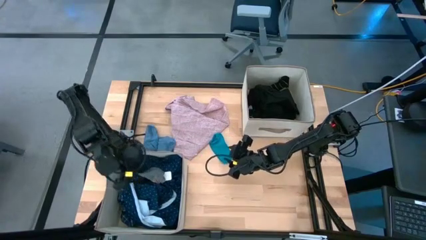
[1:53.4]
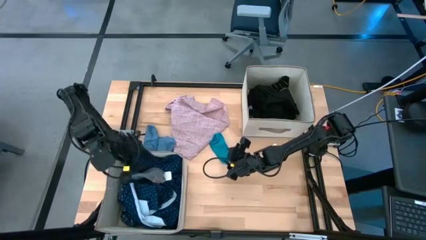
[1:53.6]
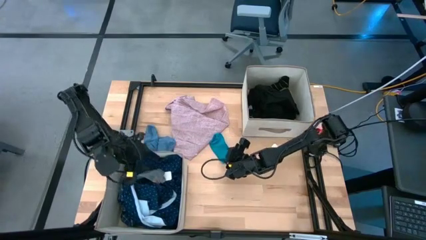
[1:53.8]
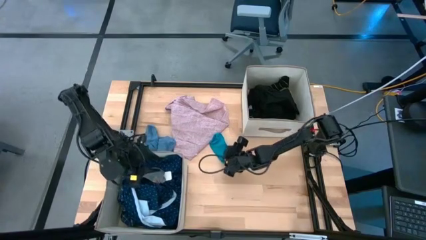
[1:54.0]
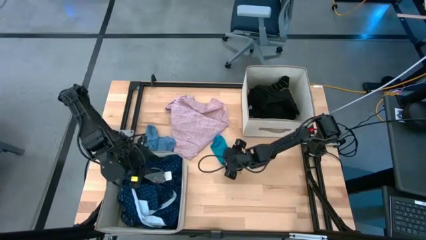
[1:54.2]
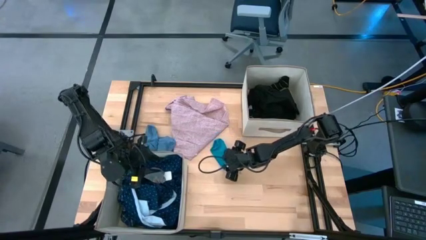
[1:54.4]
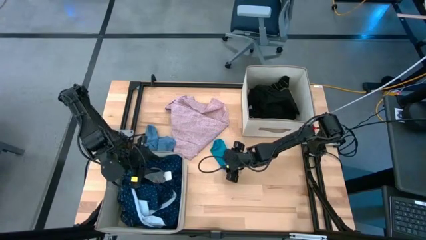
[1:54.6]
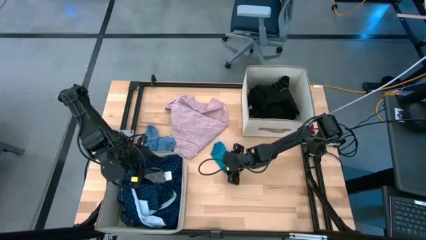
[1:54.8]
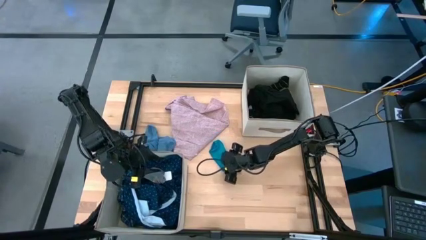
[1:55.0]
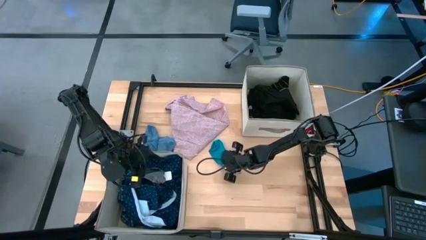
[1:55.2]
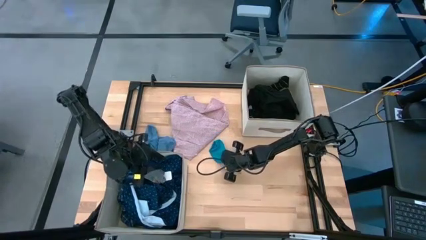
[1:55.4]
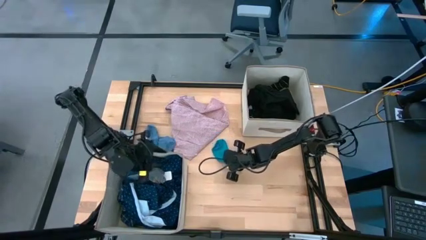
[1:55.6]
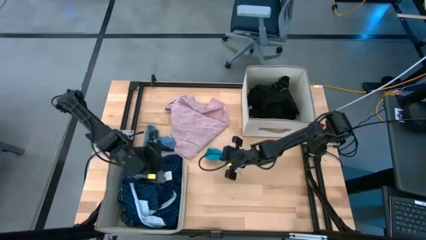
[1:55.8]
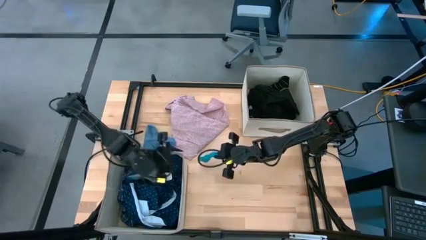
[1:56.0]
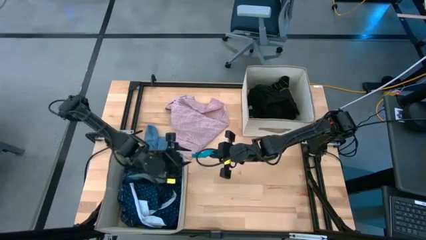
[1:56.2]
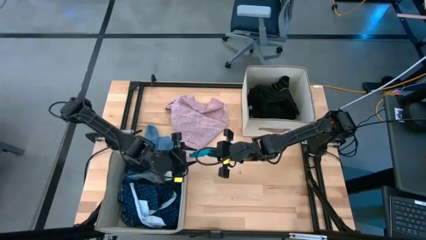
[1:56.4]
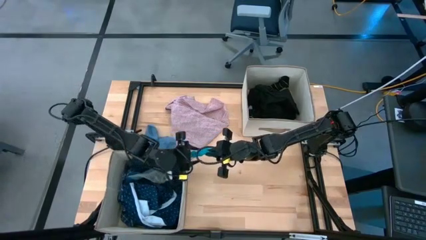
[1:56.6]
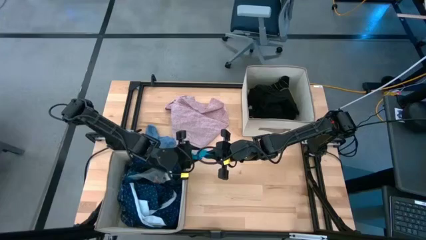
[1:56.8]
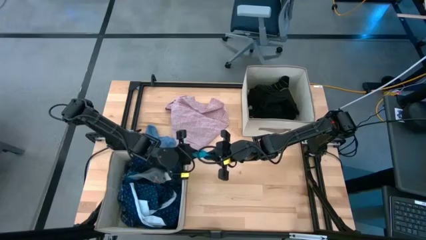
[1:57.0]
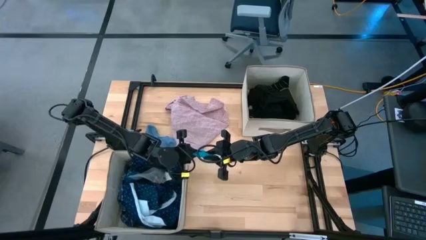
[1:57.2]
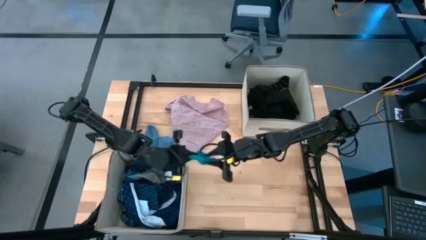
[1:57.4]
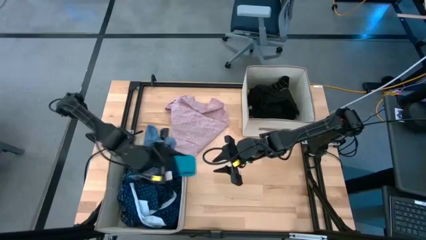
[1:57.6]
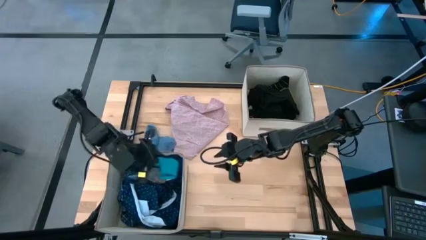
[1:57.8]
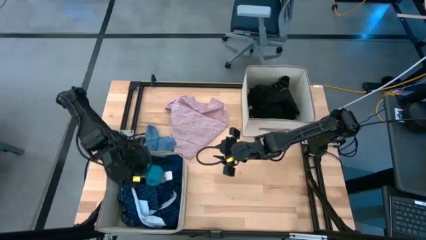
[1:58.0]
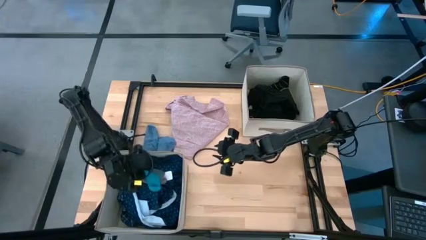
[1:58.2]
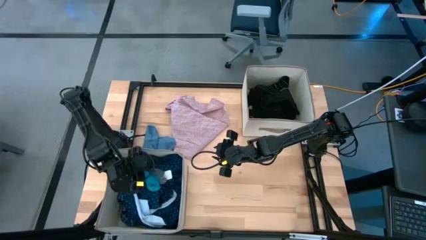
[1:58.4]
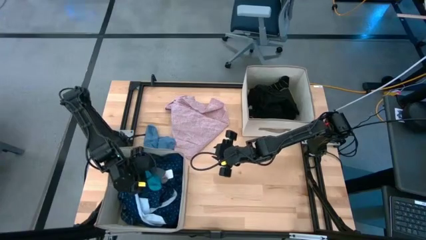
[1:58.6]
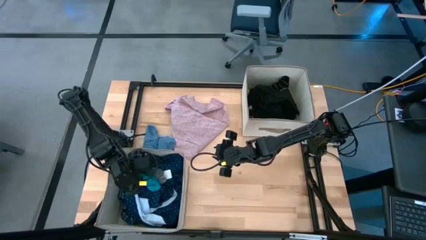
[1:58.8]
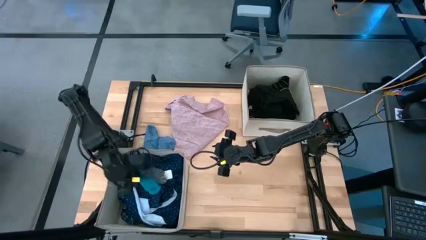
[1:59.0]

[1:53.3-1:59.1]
Task: Sort clothes
Put the blue sock into the bottom white laundry organizer

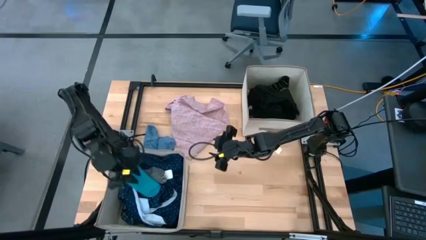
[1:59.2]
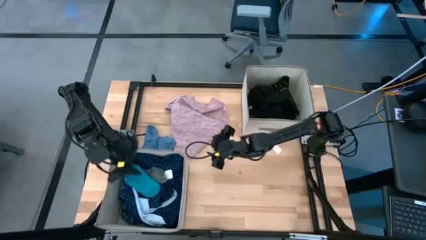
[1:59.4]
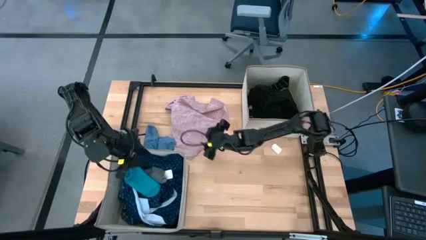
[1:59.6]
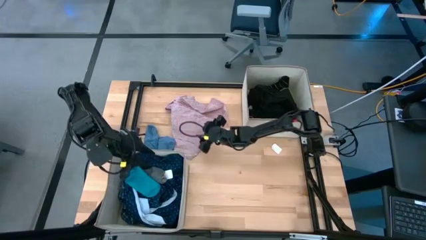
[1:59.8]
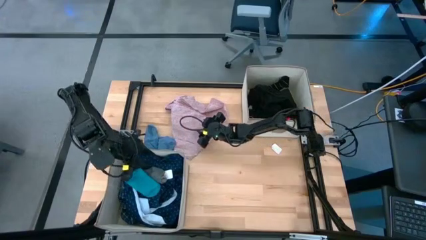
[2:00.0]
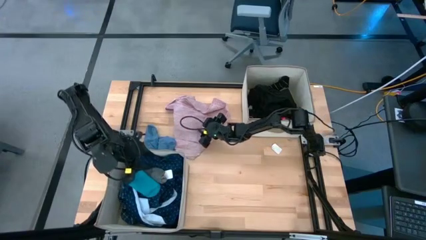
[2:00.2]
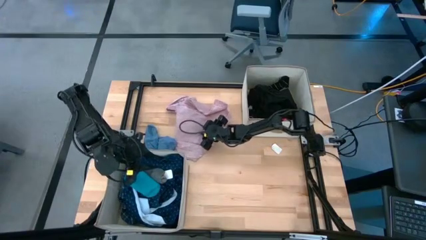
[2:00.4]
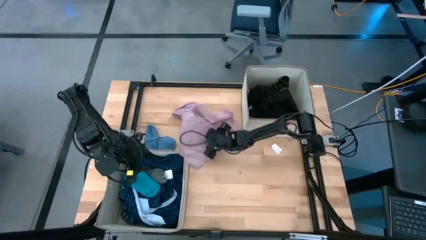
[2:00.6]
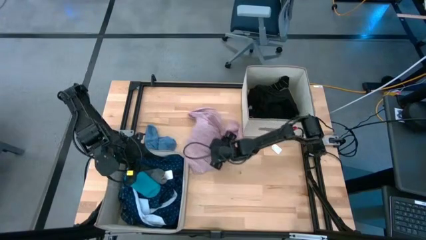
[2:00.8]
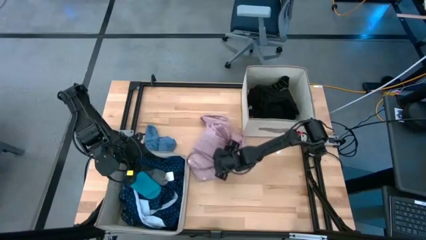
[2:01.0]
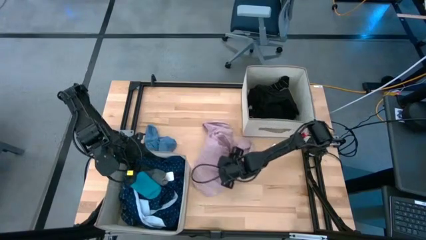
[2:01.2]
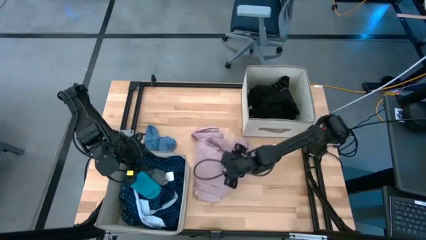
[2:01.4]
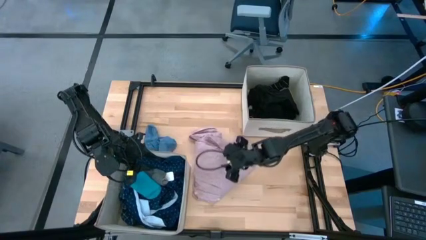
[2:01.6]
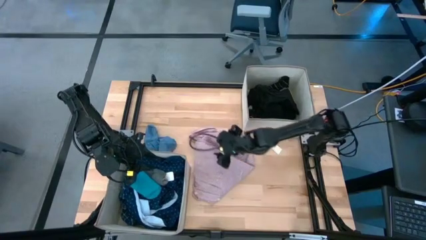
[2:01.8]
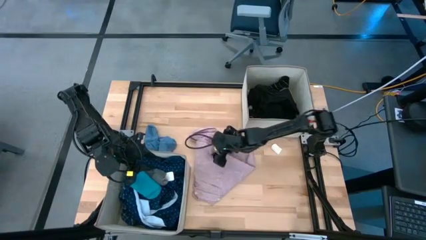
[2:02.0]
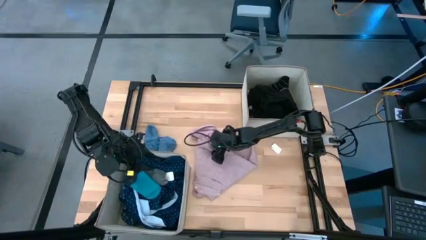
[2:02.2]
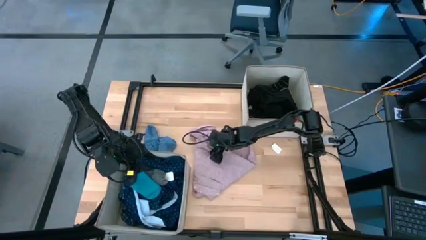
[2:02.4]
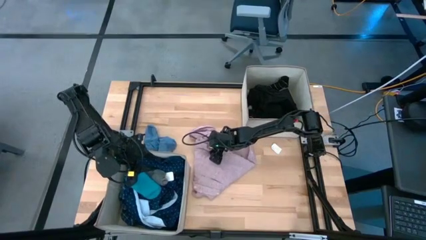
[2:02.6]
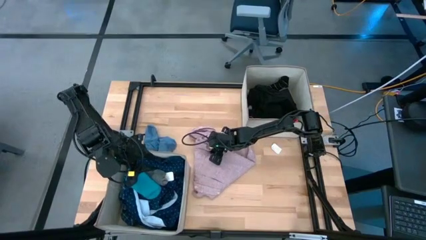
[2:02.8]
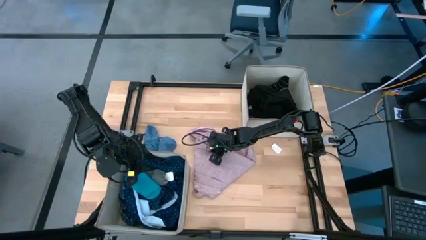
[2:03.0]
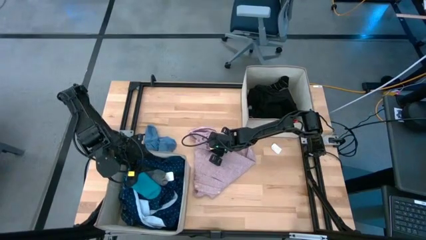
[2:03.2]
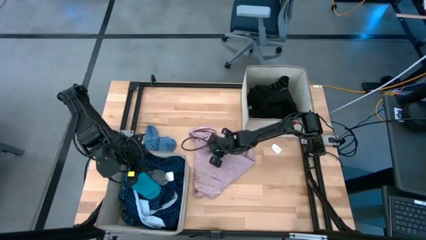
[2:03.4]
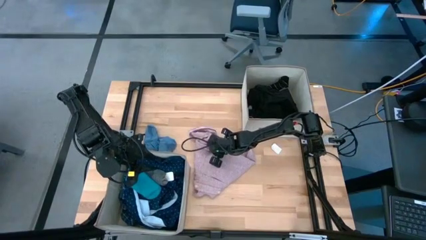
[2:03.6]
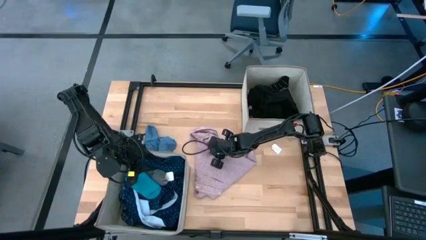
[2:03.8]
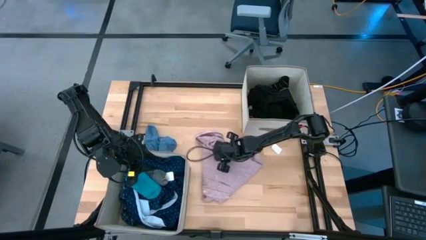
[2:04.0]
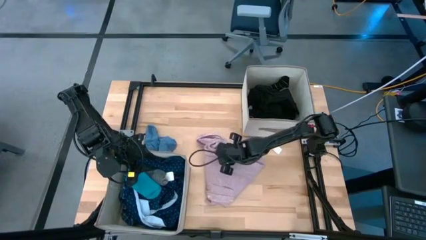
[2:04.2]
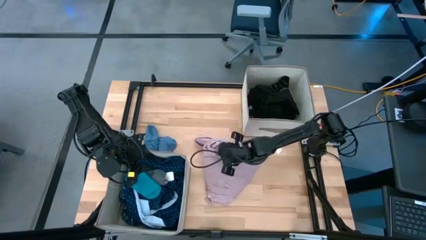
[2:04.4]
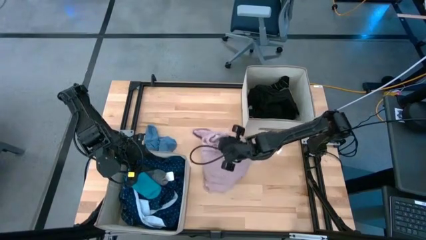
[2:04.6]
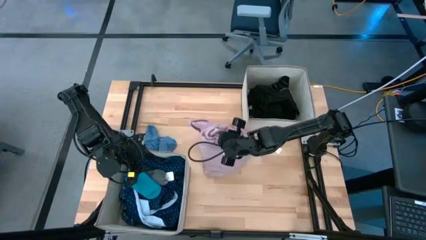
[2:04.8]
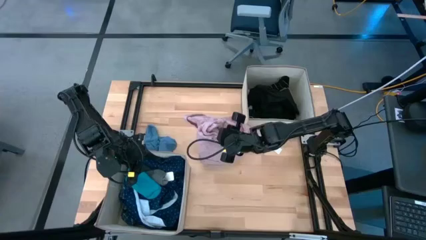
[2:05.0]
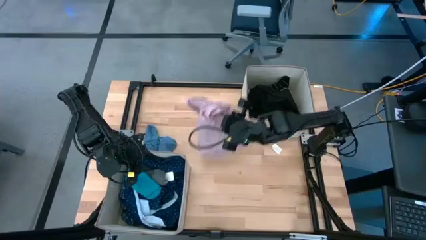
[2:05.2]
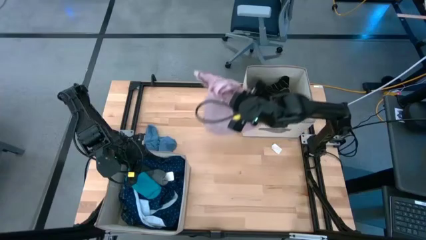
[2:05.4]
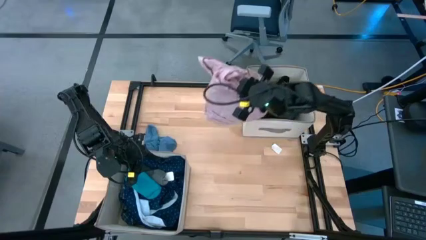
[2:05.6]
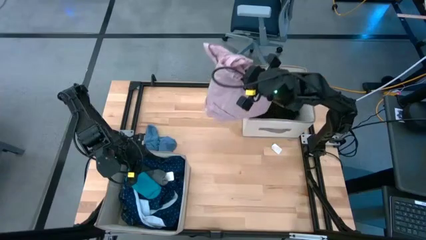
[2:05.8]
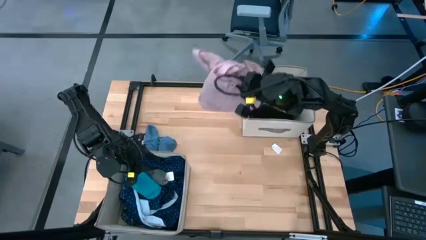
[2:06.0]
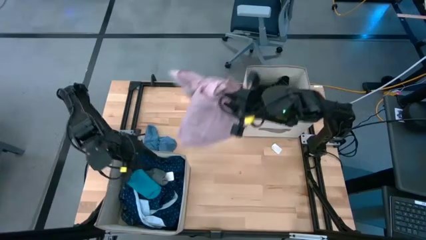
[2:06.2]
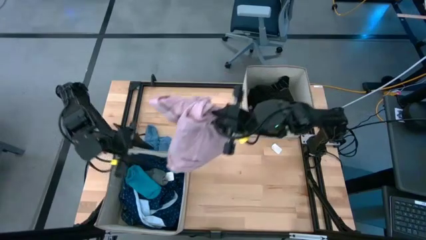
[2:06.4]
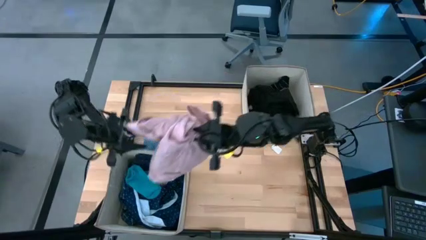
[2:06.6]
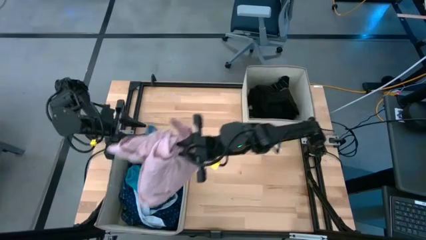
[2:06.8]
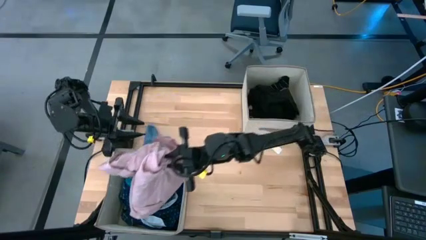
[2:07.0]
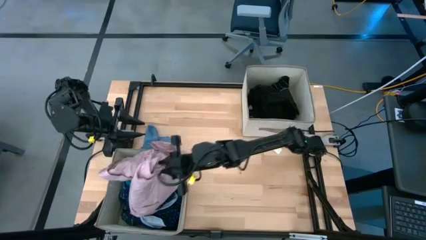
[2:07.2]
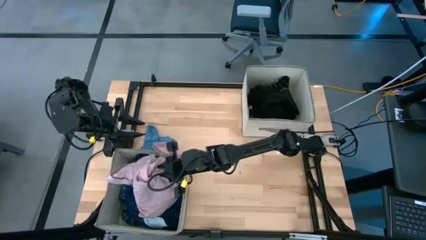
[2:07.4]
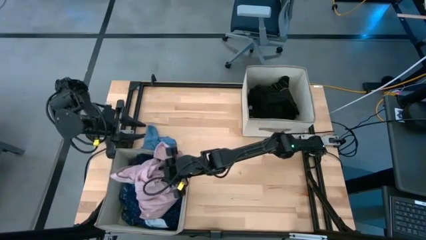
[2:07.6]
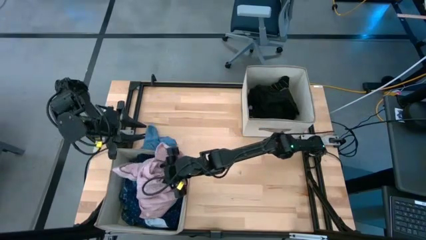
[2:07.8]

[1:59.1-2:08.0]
Put the pink shirt into the bottom white laundry organizer

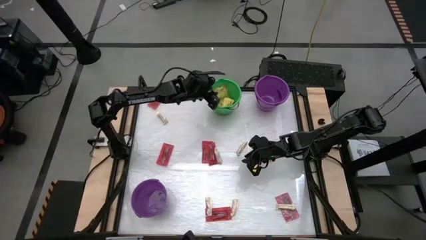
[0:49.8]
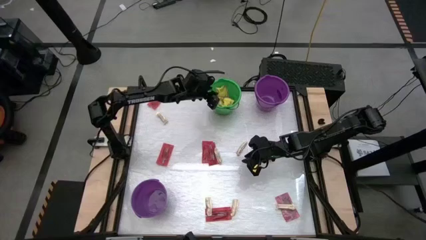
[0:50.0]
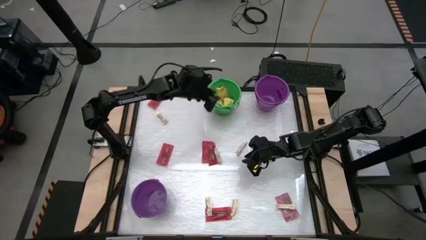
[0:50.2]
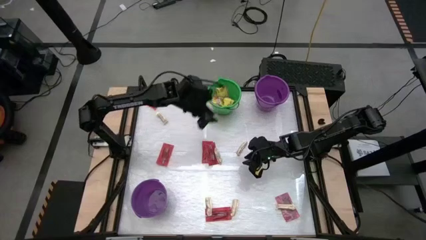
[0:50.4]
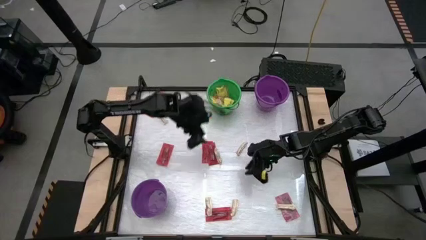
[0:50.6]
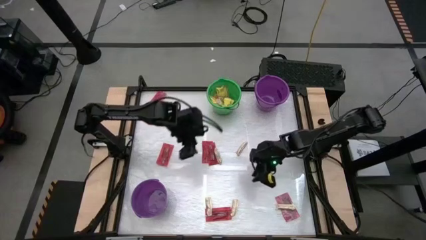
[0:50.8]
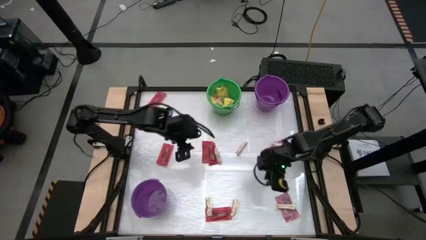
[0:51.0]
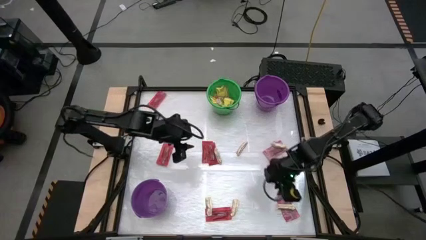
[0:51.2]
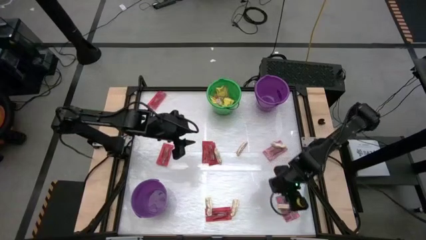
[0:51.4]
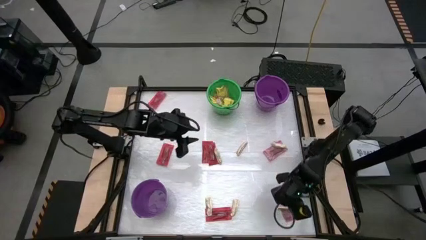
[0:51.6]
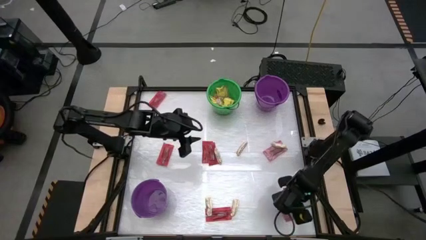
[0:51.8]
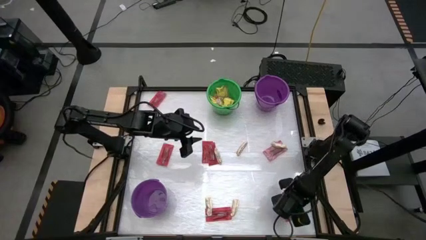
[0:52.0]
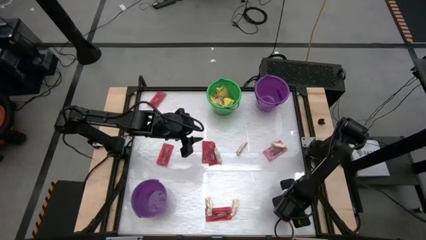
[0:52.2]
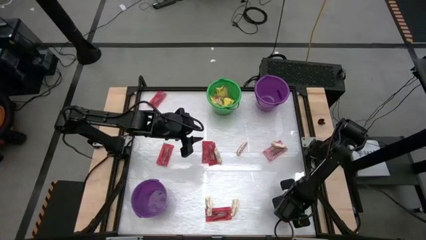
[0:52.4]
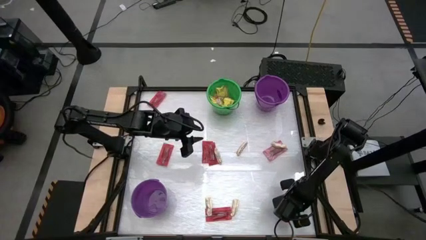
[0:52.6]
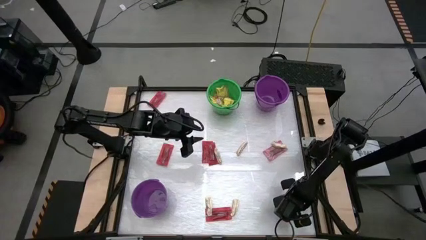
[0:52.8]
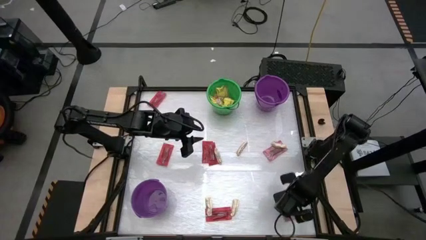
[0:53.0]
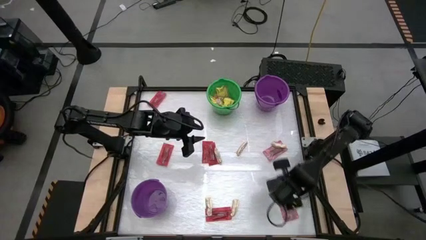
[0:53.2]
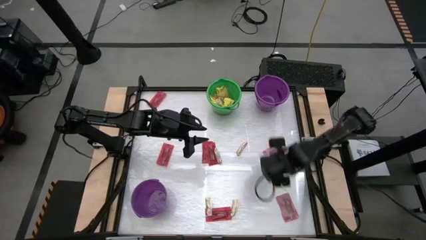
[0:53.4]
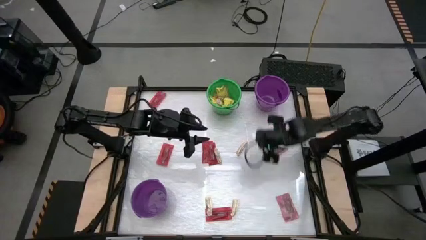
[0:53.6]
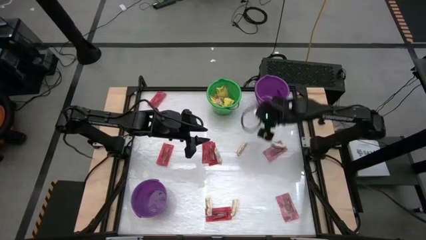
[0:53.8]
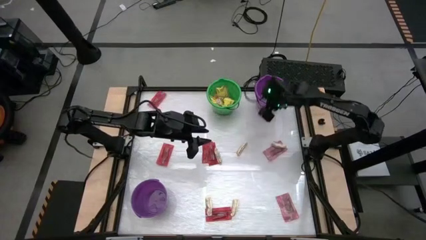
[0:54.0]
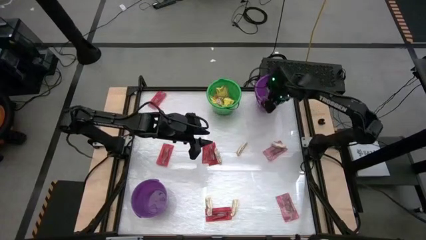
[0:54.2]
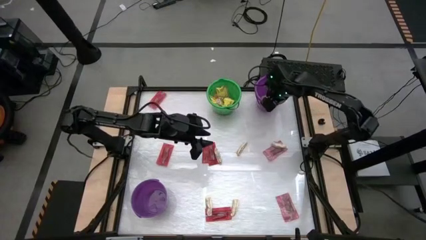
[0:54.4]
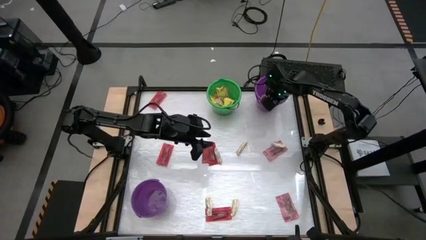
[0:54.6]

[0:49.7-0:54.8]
Task: Sort candy by brand, put in halloween buckets
Put the light brown chocolate bar into the top violet bucket
